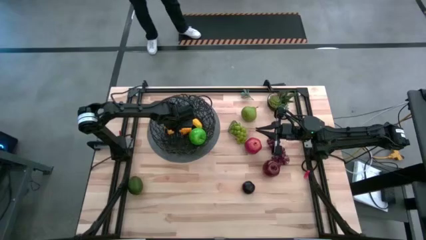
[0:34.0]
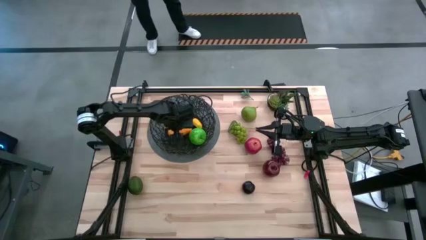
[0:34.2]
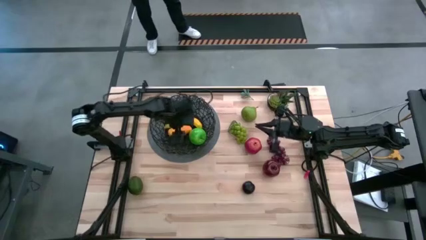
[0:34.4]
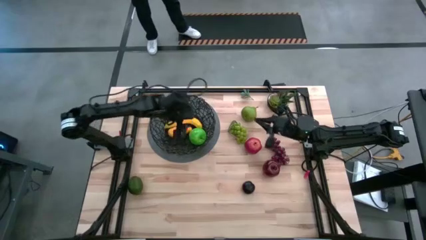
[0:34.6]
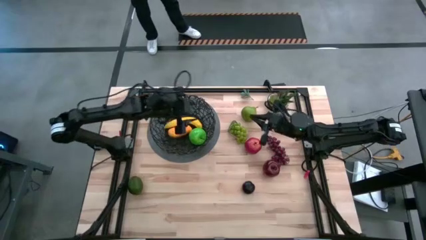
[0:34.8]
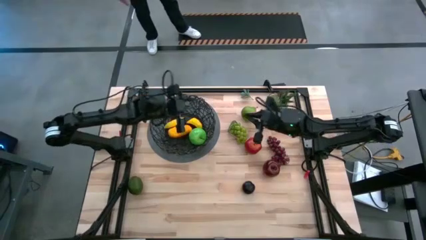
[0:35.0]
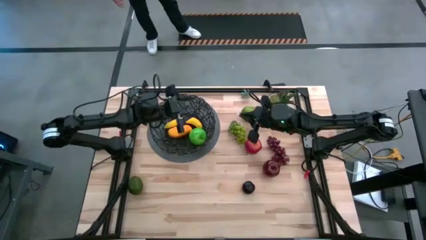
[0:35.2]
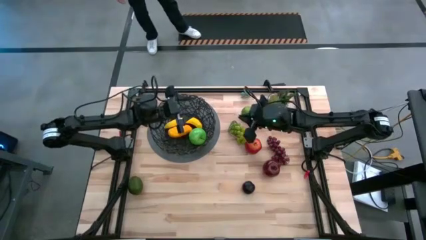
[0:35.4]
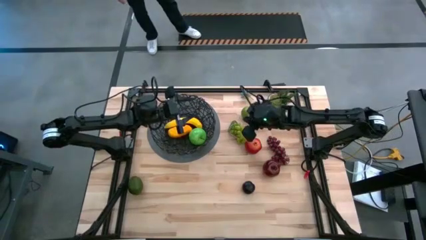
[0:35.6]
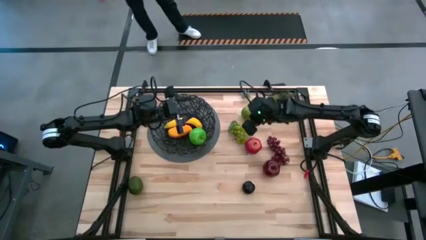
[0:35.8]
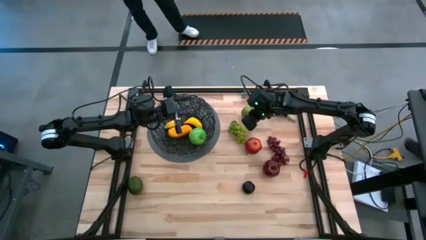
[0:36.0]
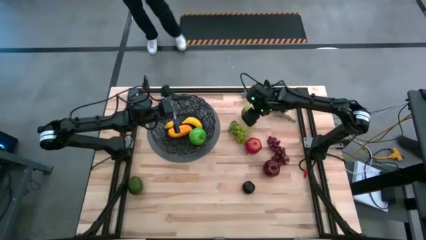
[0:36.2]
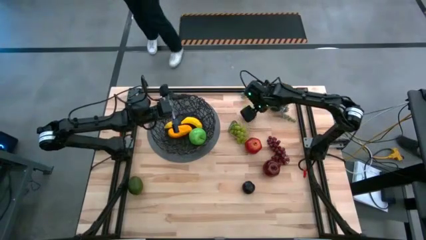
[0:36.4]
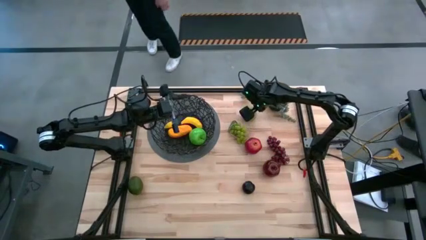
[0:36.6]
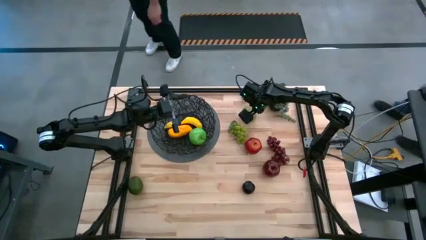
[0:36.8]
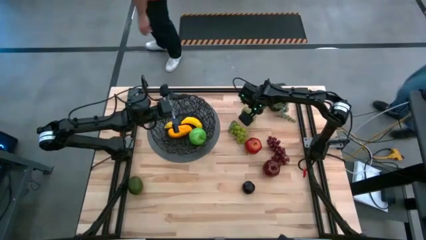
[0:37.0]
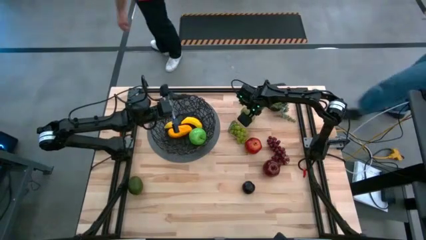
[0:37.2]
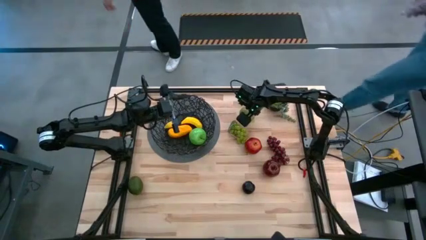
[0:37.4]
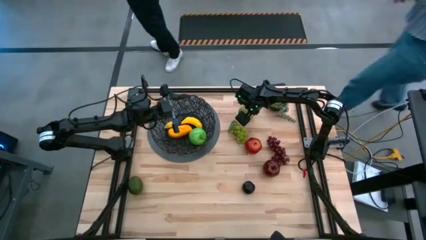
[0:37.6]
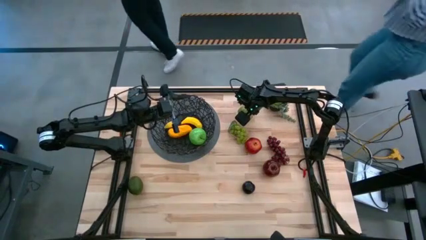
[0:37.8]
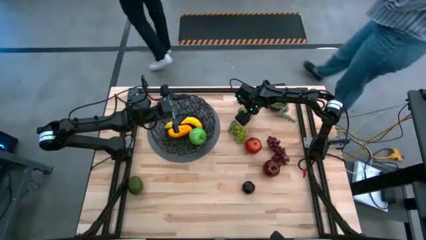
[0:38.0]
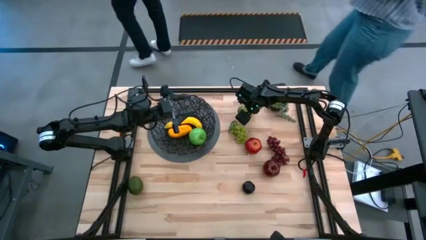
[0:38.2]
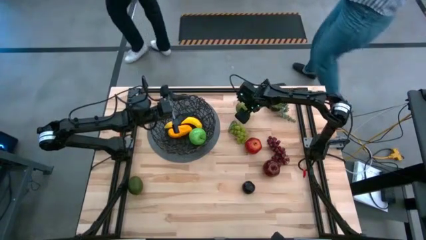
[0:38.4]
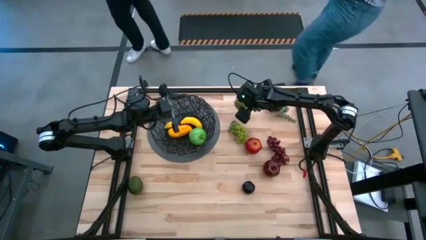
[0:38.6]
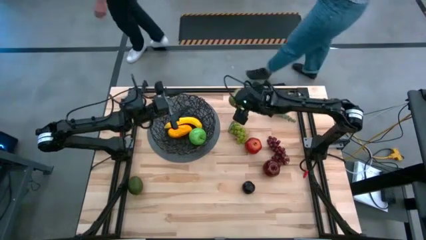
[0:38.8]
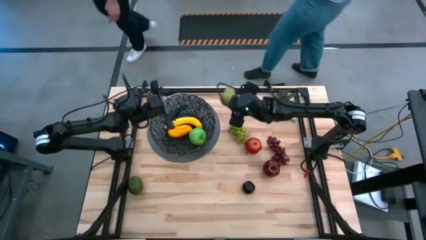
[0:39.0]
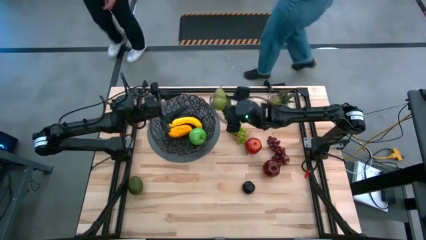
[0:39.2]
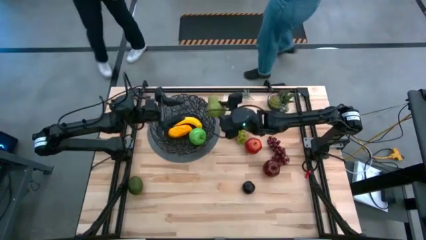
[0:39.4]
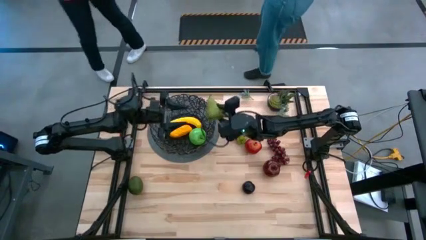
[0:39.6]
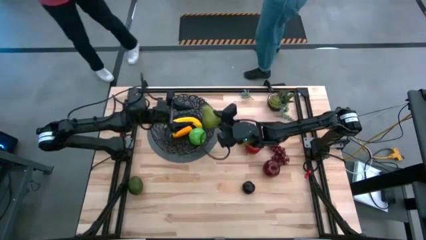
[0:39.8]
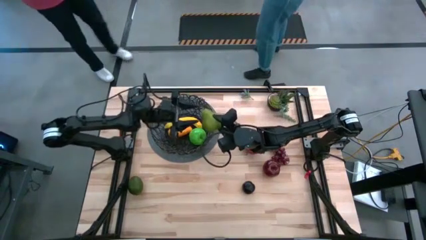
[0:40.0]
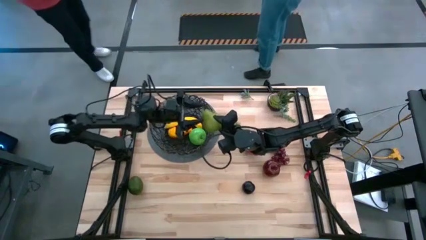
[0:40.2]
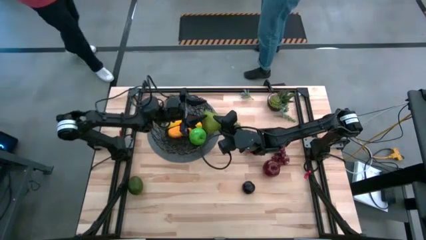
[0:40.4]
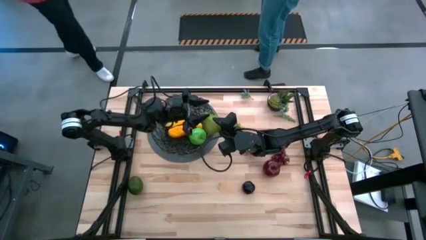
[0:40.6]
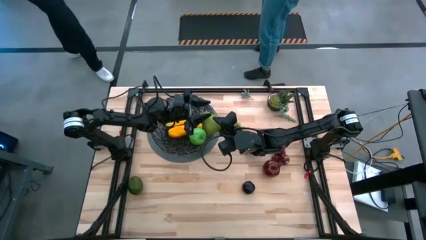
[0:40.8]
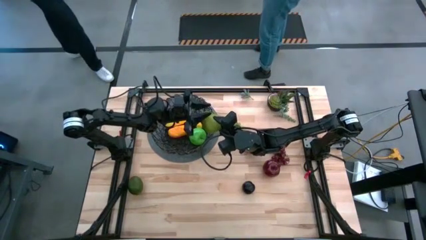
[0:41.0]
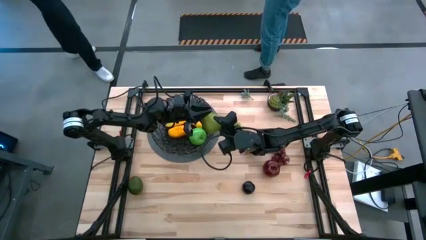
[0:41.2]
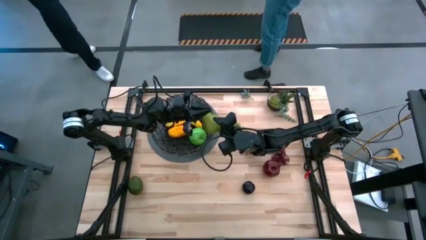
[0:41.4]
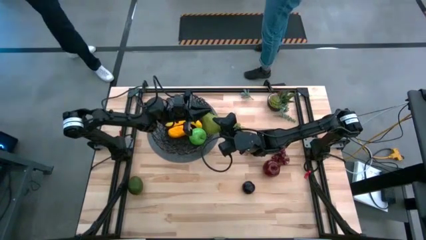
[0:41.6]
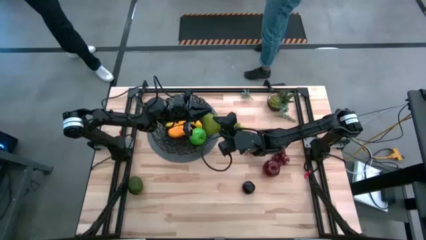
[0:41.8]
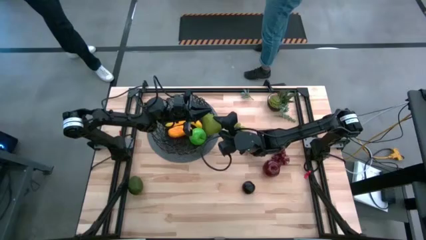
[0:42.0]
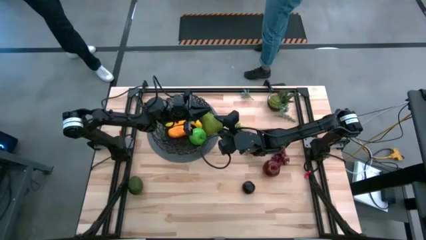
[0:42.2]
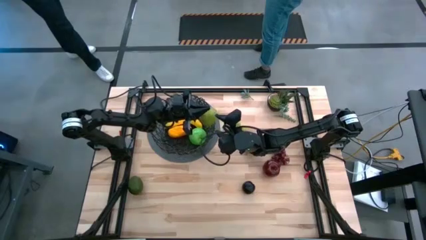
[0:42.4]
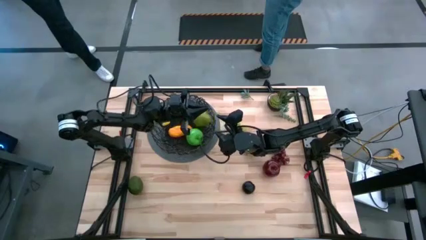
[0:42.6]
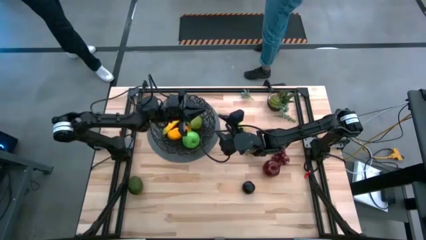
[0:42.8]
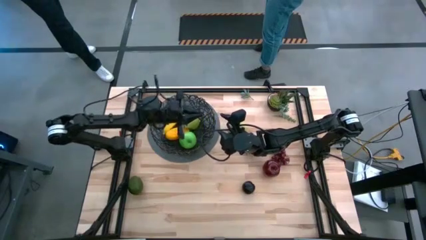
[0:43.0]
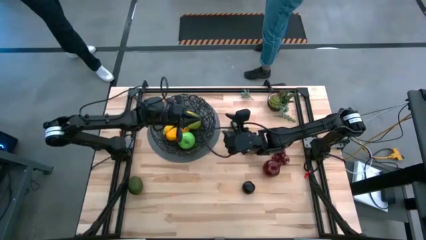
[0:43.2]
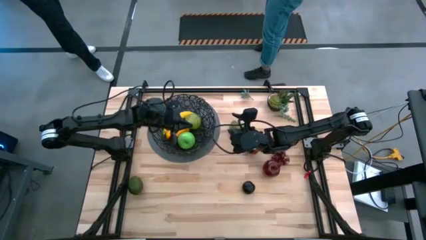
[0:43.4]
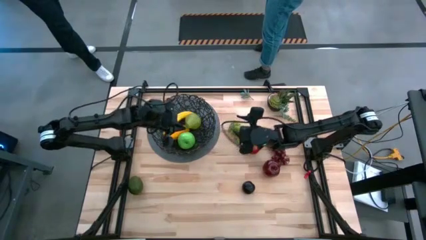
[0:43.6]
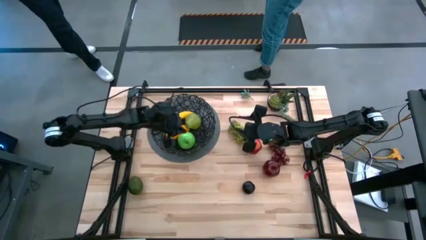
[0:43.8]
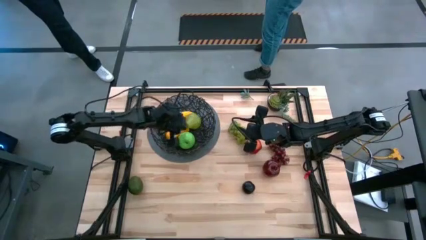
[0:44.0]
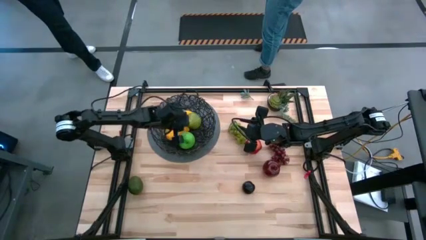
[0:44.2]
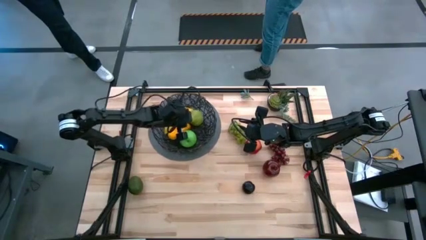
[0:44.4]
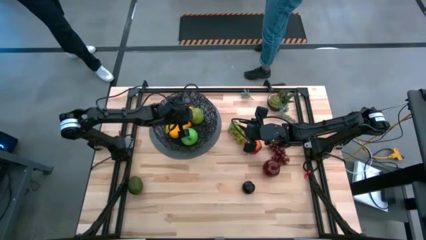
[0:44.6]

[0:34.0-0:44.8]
Task: Build produce basket
Put the pear into the basket

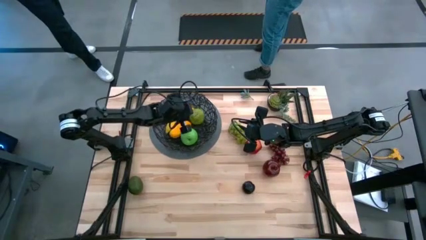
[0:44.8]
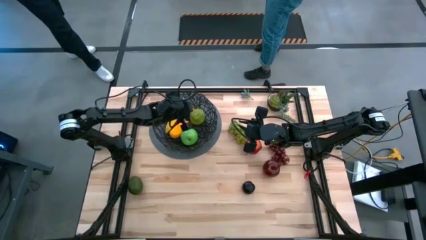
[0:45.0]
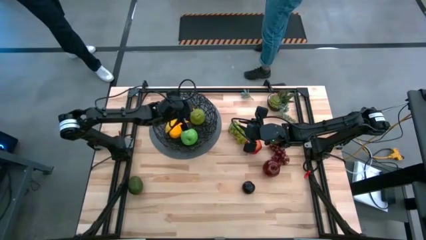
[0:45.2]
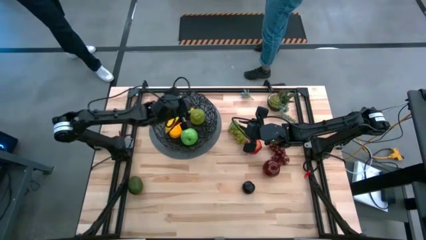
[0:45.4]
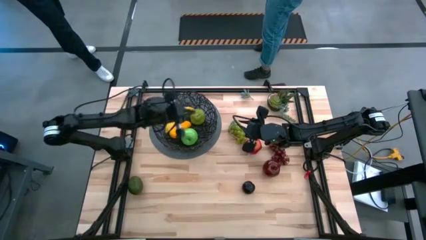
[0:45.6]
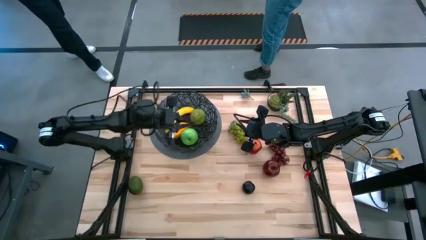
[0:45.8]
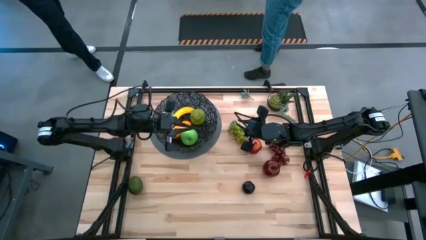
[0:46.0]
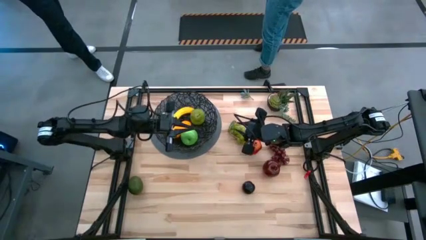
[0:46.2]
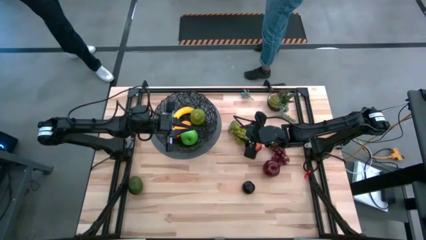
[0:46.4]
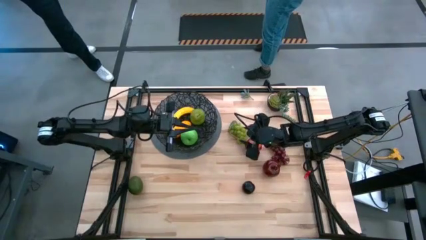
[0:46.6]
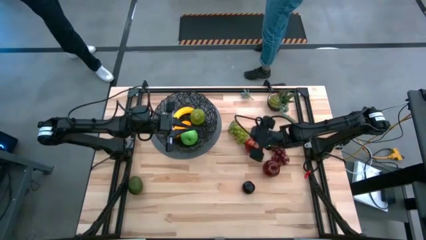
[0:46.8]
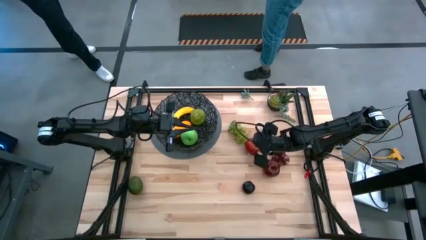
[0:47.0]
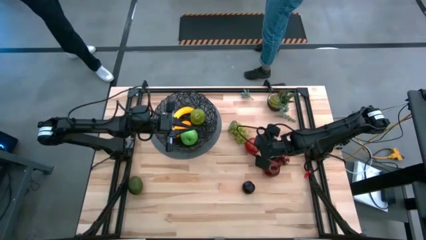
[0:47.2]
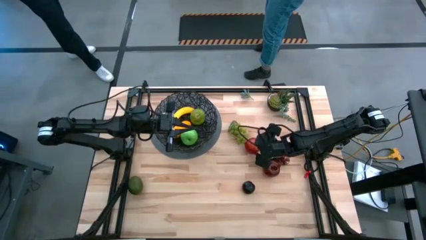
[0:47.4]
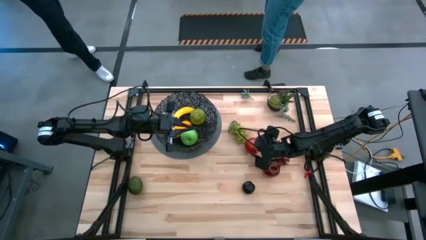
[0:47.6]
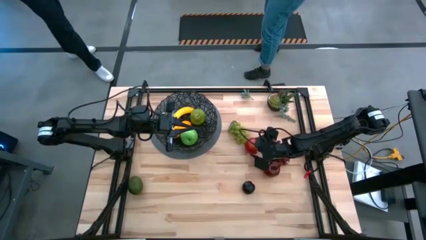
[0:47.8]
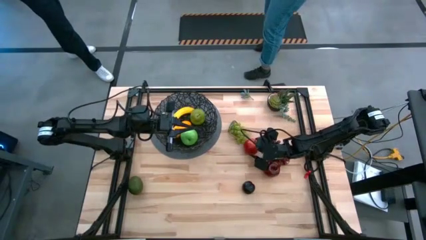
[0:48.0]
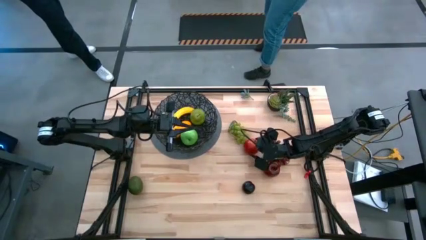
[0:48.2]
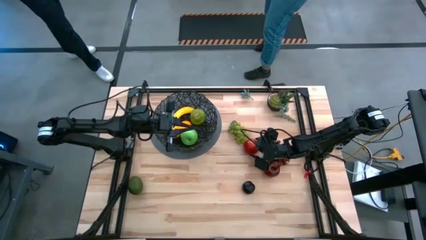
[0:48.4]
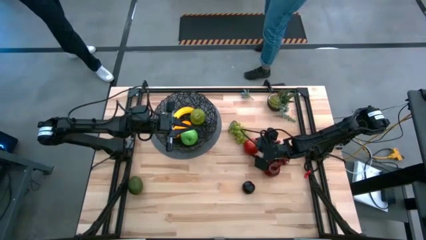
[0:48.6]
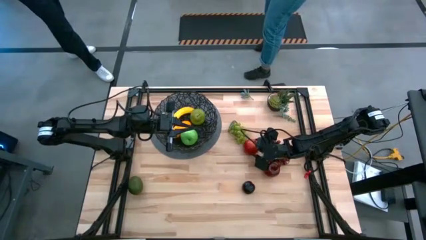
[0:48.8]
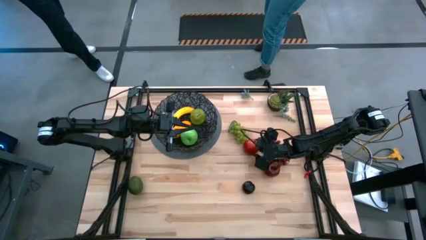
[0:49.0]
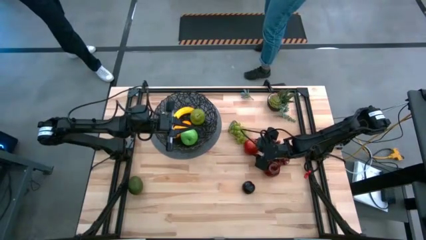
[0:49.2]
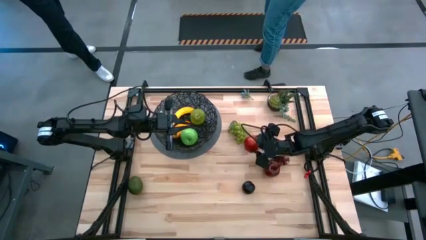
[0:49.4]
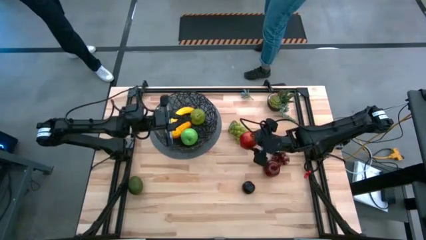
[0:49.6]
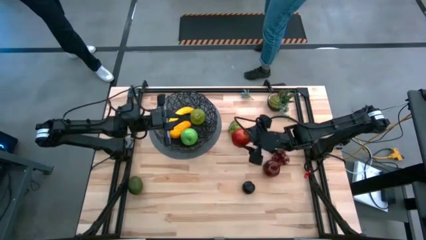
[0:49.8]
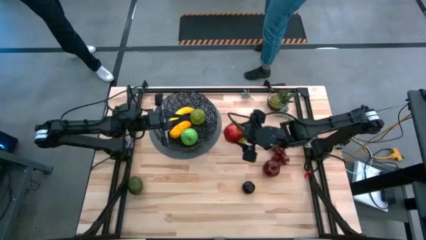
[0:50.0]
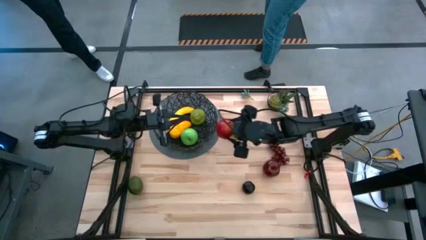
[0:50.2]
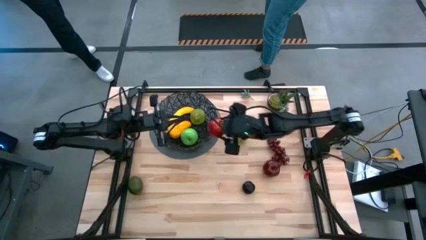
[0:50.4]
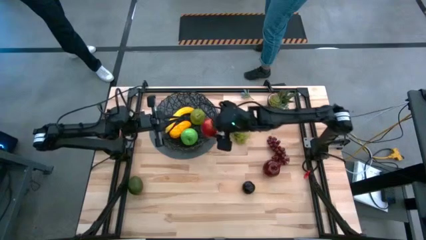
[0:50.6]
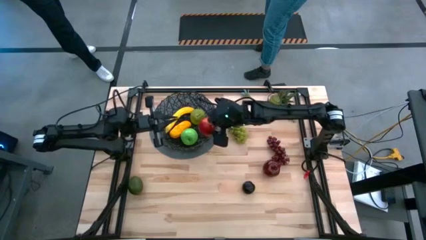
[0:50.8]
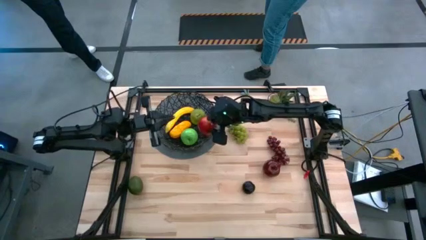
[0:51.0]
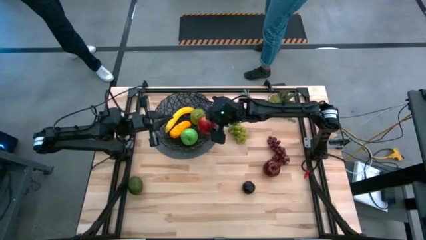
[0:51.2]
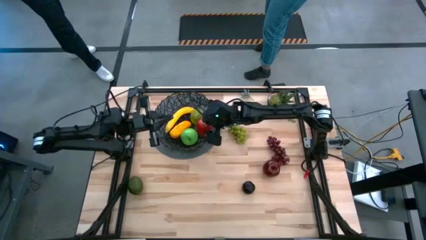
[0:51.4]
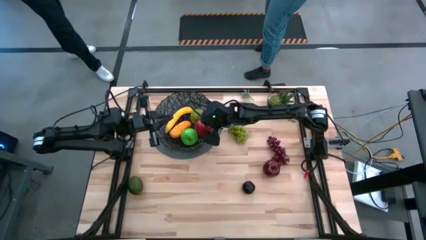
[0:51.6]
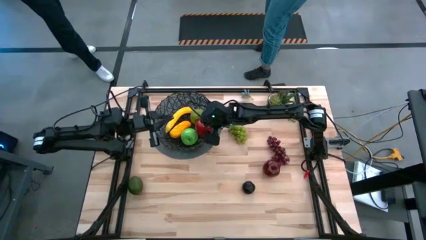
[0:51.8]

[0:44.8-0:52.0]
Put the pomegranate into the basket
